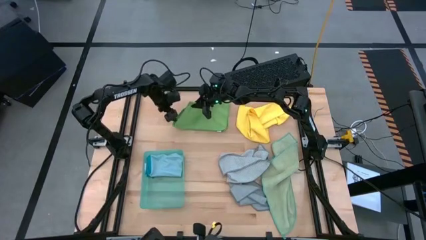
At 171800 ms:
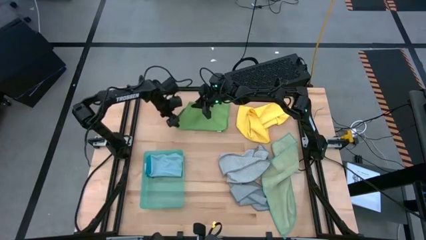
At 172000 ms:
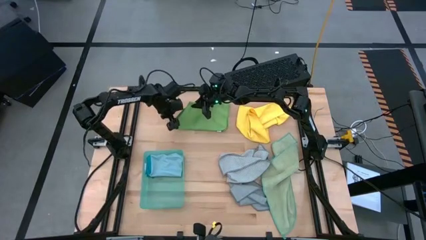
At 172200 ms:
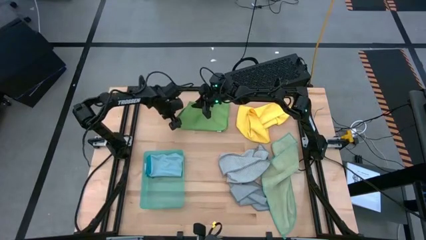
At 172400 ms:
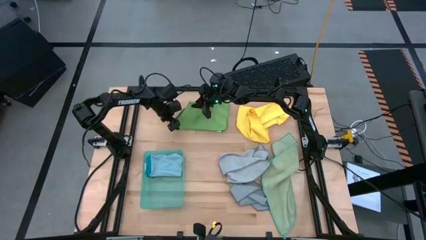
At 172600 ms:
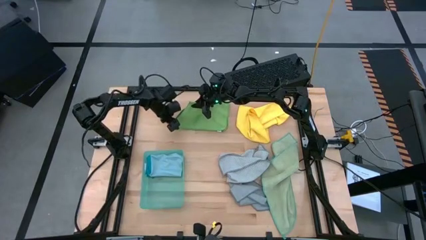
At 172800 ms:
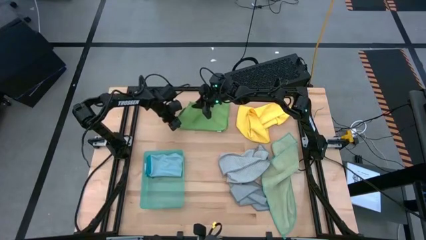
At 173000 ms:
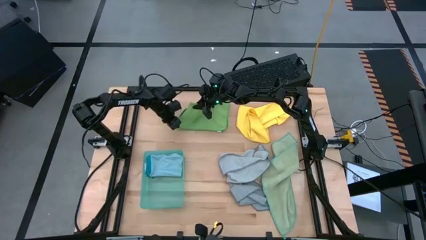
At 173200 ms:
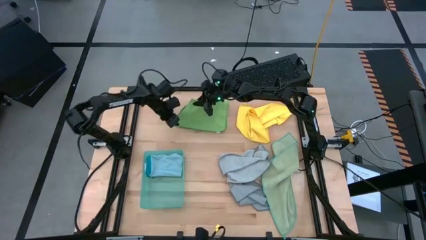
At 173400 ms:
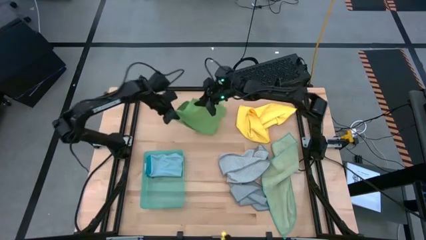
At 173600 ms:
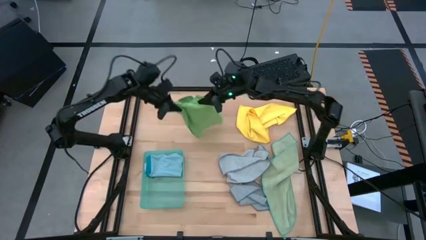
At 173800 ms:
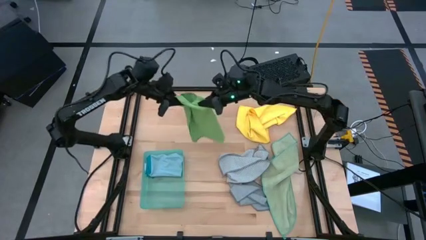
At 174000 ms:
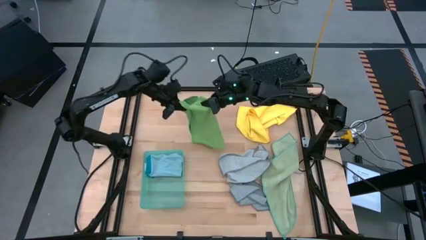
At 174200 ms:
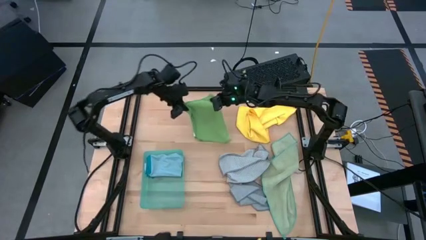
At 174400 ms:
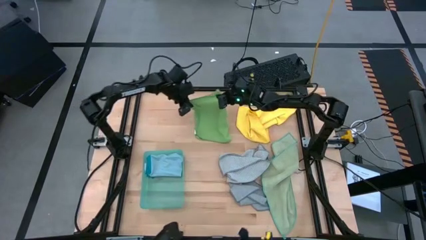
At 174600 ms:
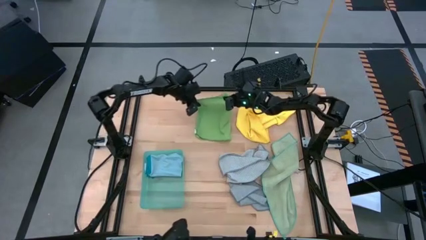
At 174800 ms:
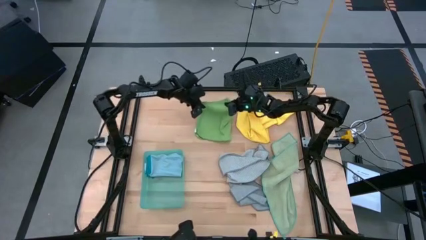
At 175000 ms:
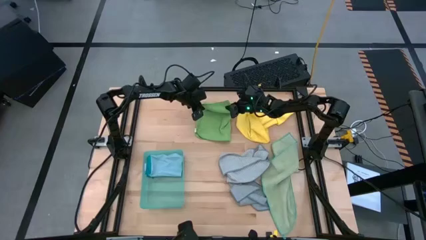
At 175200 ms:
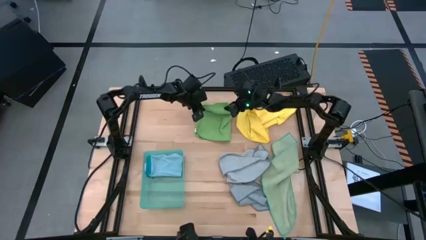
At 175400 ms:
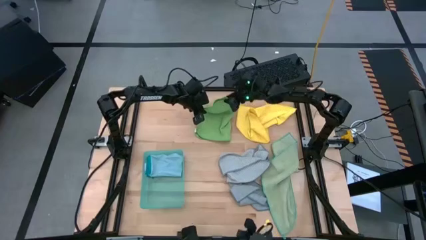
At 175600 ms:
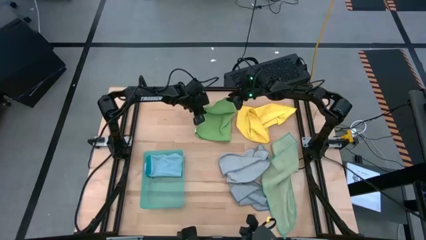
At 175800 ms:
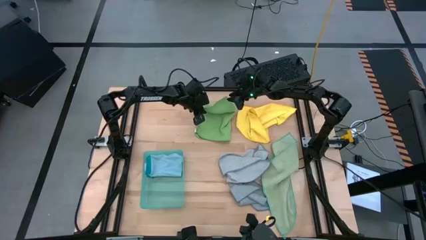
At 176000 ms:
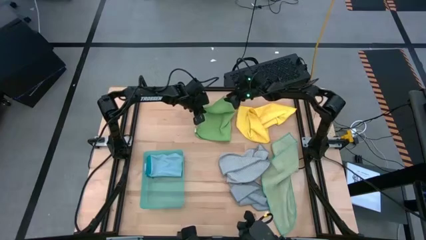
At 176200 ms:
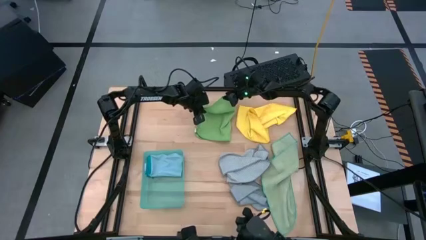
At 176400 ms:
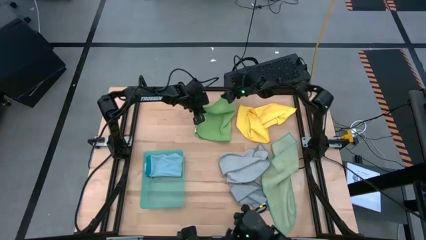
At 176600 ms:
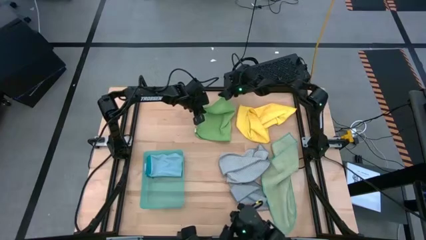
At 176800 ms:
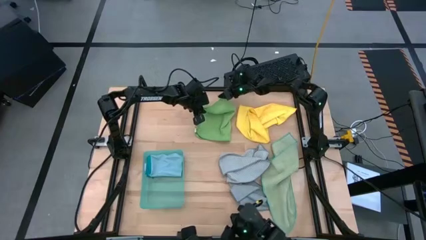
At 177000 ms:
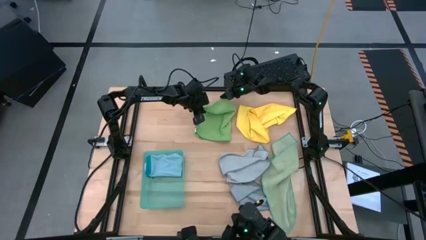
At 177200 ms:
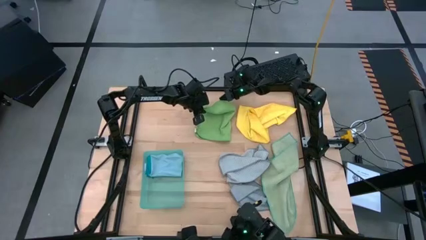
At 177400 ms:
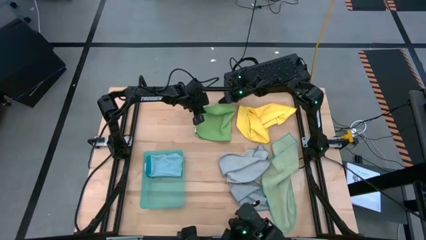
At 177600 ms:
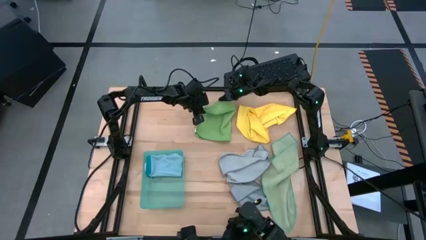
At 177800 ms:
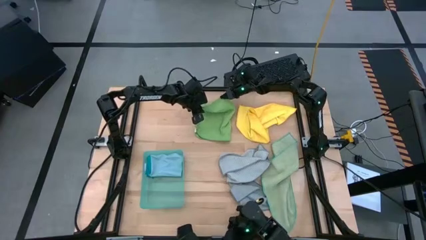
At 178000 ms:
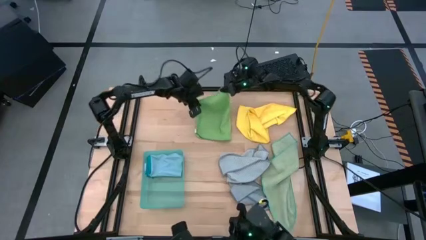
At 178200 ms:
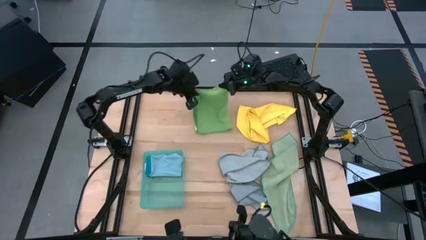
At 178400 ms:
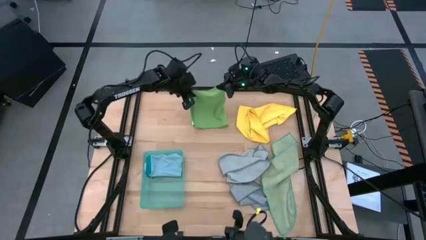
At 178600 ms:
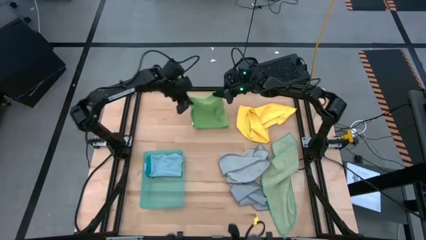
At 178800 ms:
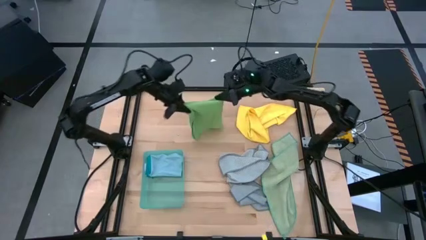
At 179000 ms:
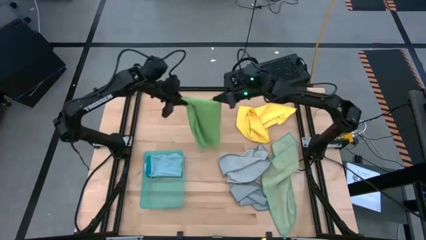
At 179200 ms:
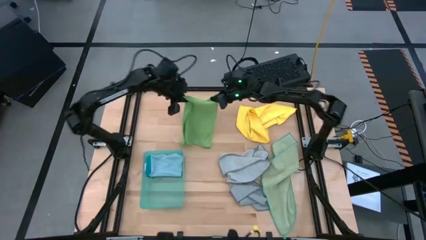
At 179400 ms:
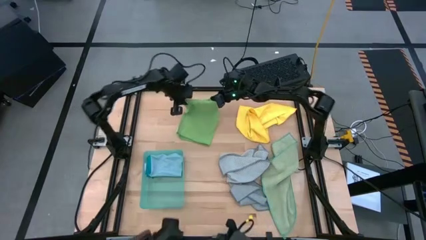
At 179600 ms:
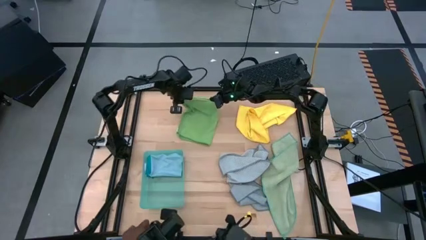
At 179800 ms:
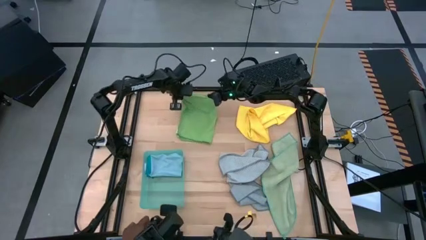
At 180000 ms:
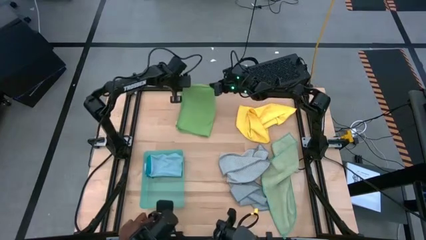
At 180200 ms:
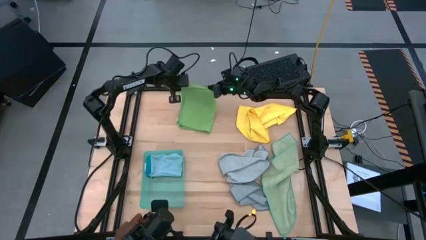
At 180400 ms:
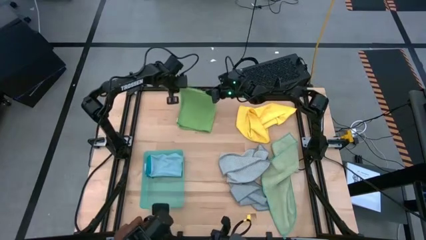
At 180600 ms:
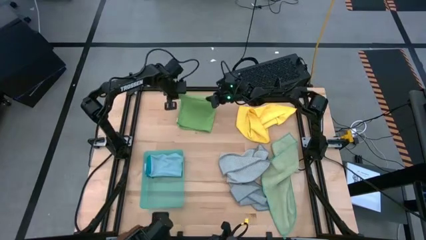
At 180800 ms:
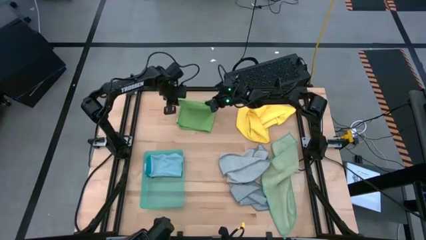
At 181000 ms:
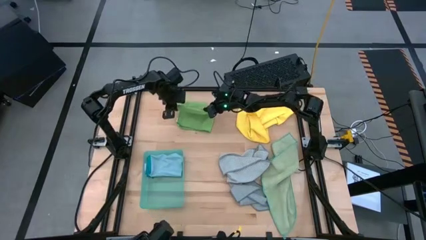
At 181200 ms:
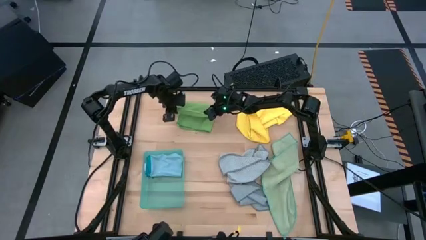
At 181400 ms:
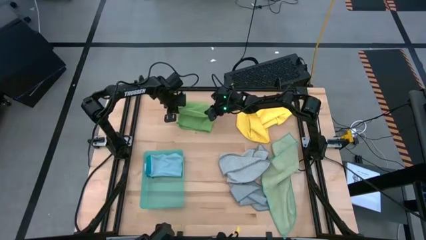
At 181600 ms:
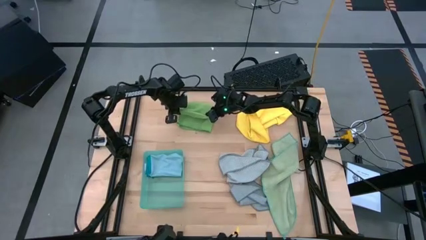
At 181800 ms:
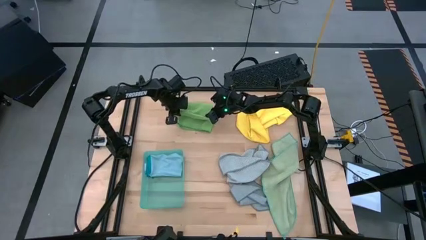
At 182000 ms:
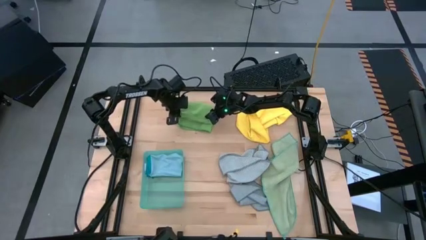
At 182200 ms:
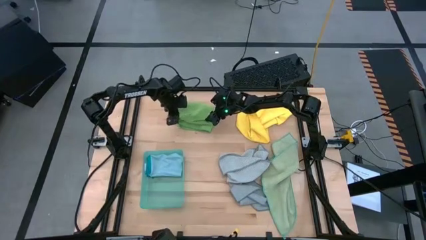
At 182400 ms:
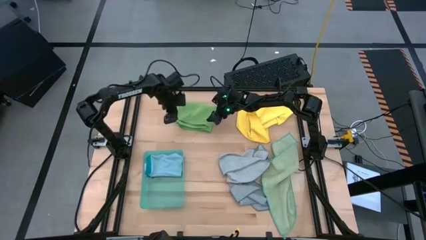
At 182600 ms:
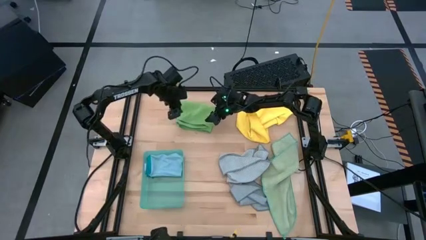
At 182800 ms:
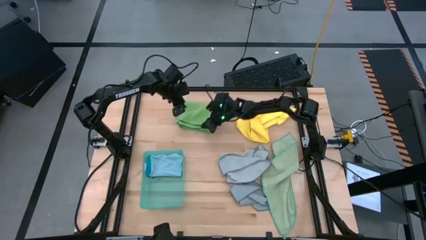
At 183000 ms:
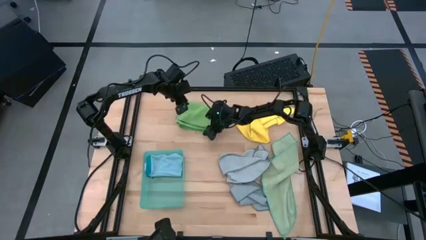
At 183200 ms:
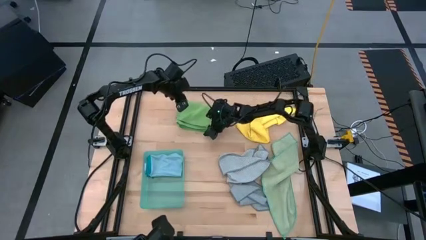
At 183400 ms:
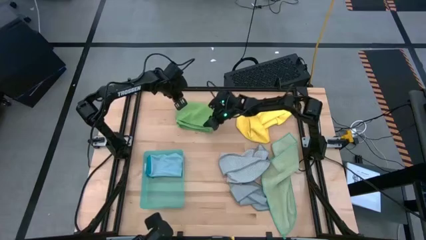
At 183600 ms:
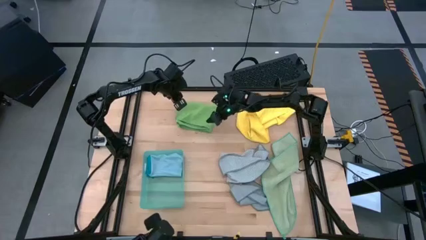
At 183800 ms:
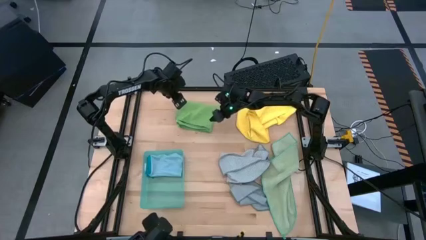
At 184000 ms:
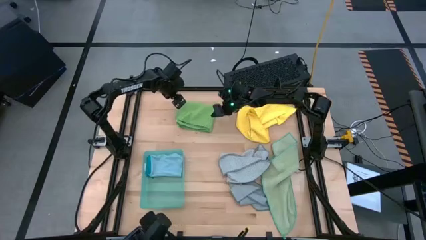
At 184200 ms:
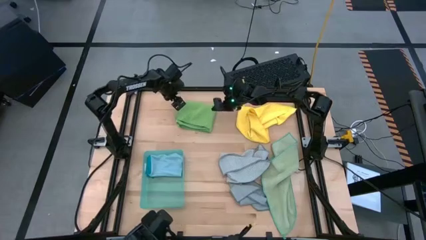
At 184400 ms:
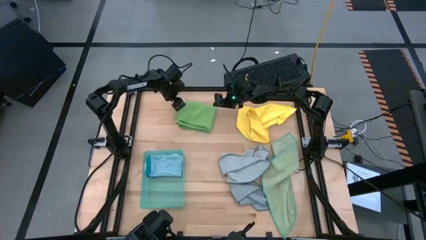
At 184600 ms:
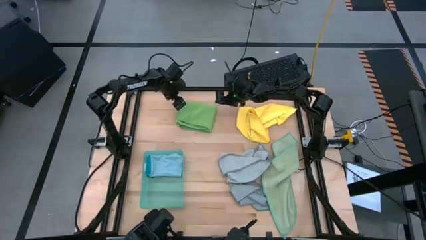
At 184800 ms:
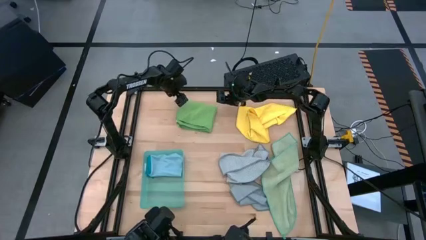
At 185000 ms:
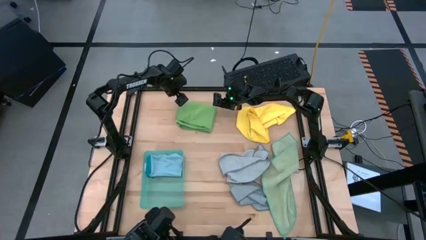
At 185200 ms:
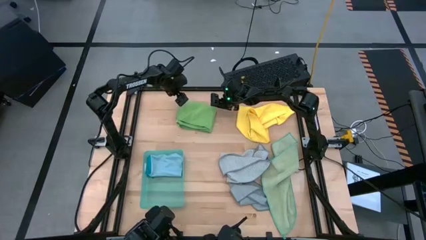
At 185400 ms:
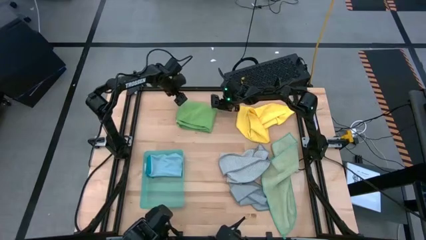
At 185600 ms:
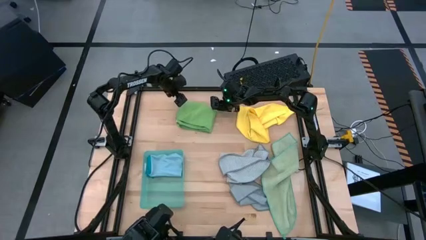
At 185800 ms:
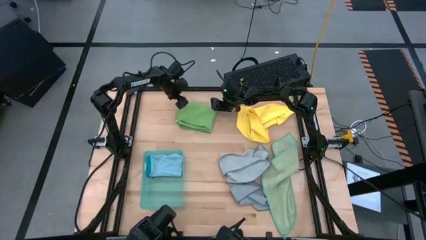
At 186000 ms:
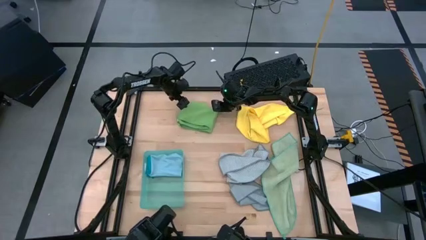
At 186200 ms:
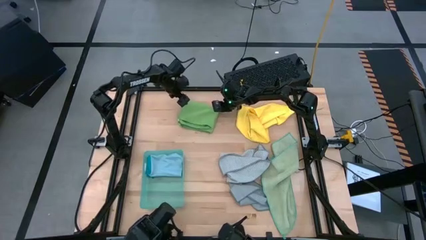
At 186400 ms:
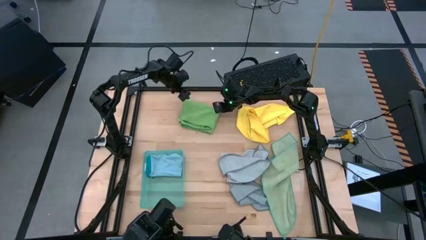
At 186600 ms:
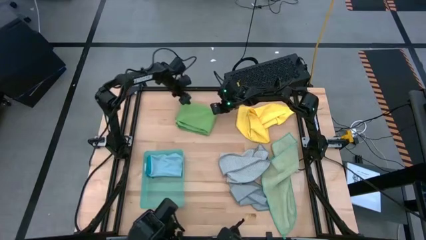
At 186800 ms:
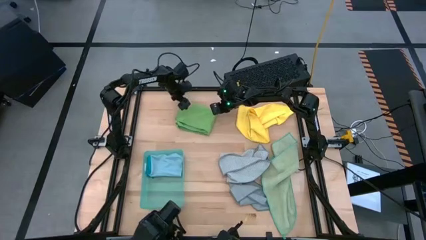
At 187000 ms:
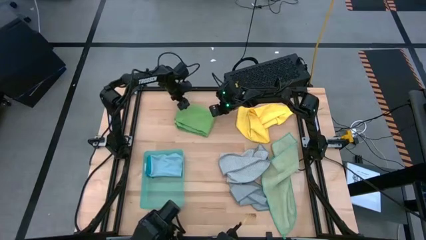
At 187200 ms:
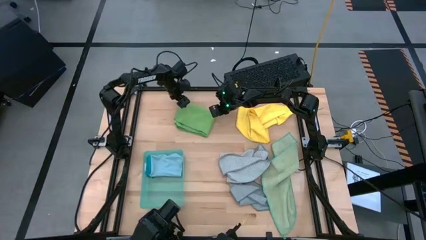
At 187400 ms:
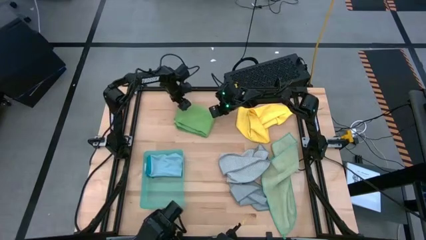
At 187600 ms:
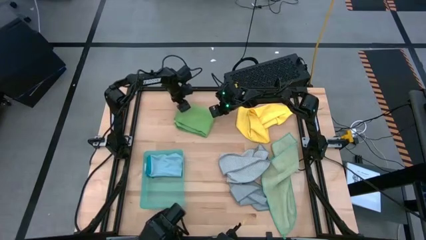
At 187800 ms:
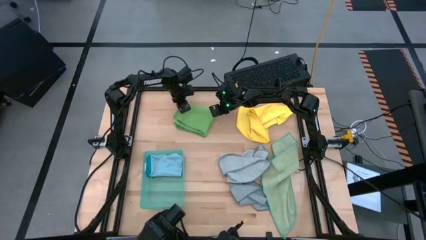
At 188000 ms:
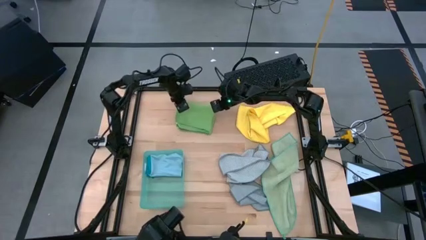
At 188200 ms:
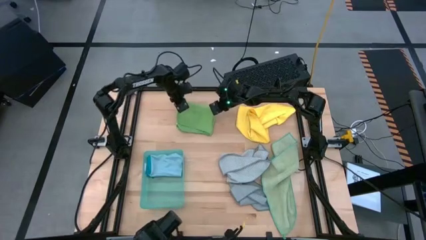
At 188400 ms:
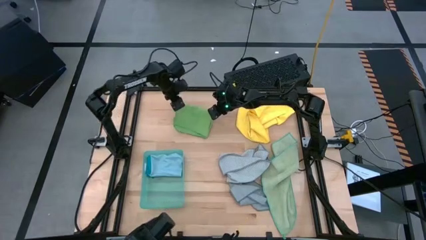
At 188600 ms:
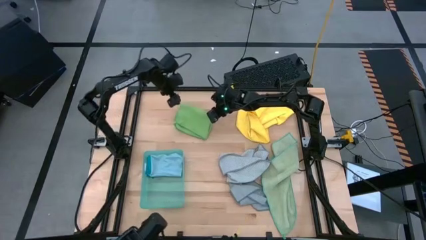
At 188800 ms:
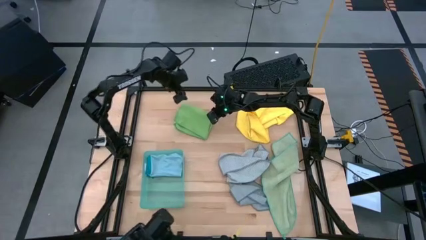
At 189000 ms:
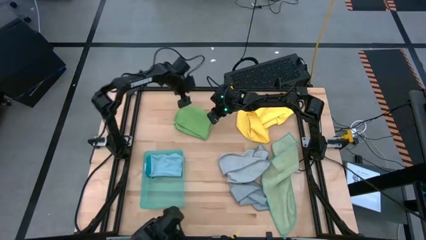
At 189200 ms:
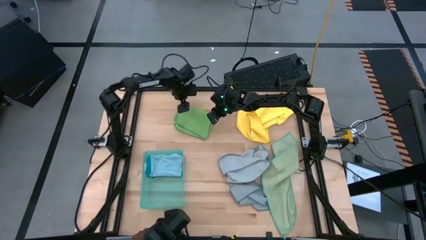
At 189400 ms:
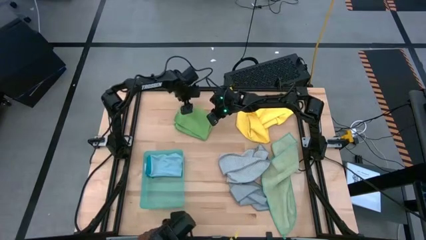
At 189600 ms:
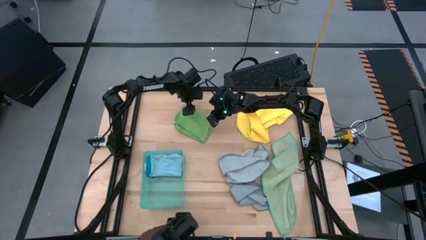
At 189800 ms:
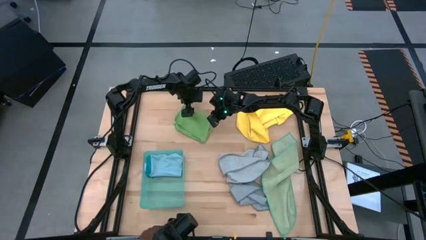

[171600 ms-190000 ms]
Task: Fold microfiber towels
Fold the green microfiber cloth
